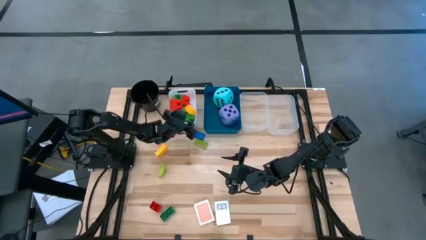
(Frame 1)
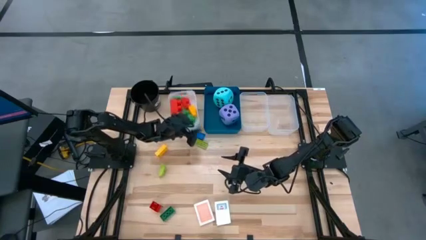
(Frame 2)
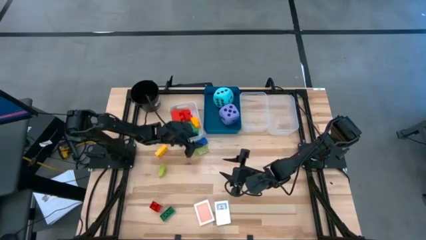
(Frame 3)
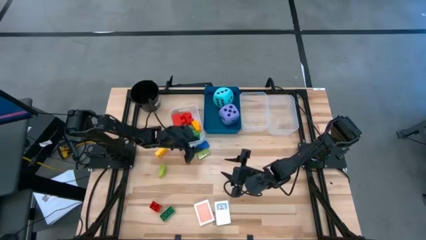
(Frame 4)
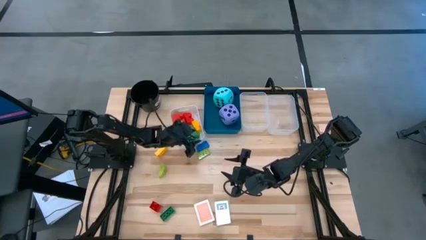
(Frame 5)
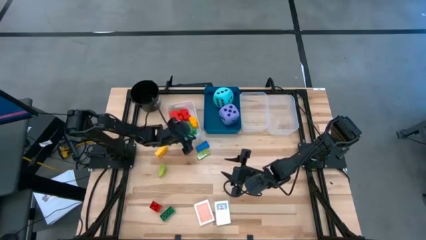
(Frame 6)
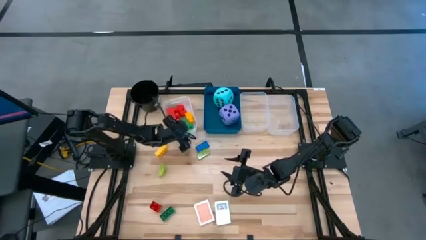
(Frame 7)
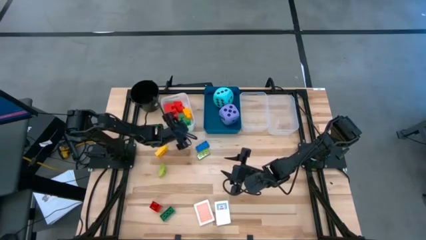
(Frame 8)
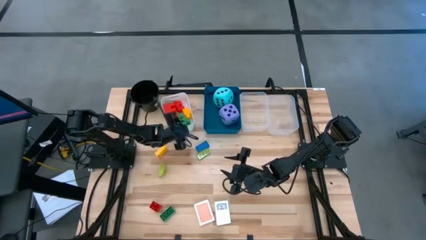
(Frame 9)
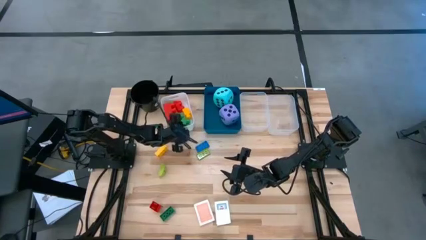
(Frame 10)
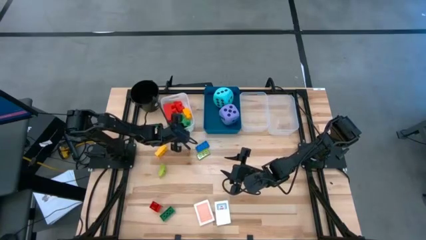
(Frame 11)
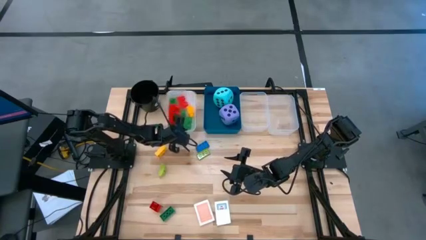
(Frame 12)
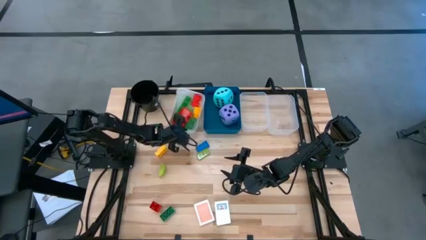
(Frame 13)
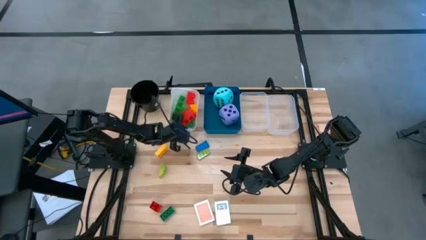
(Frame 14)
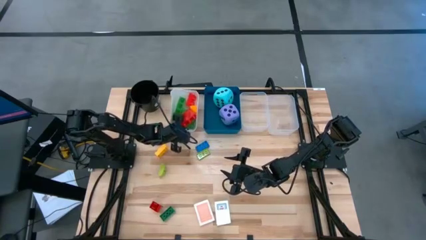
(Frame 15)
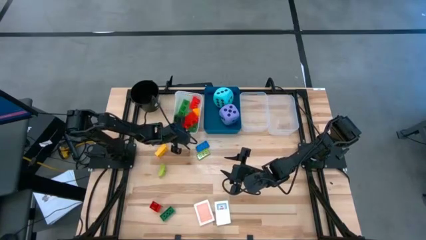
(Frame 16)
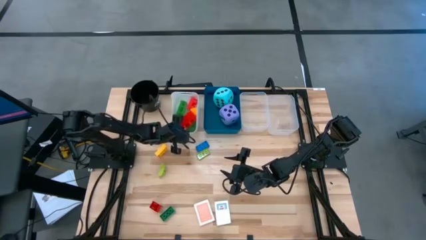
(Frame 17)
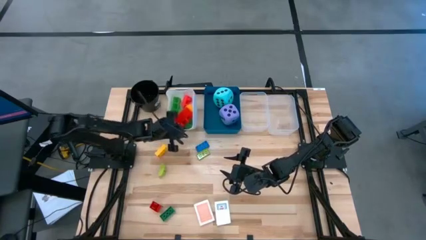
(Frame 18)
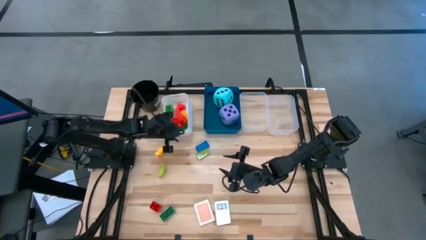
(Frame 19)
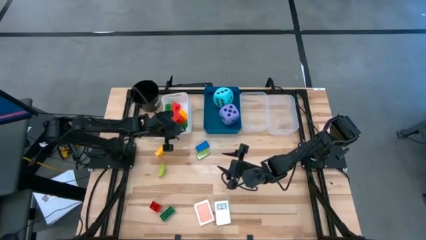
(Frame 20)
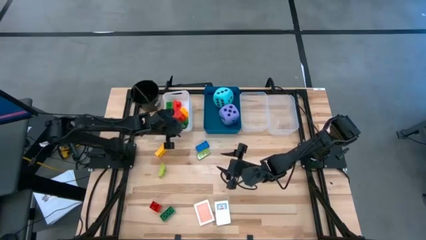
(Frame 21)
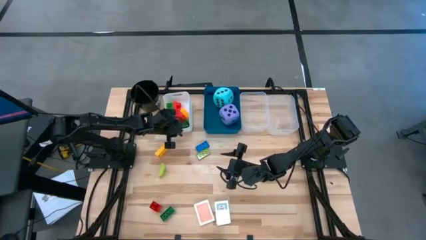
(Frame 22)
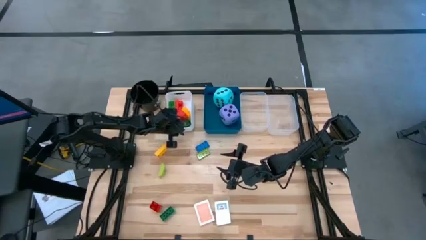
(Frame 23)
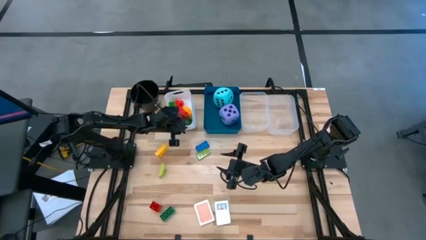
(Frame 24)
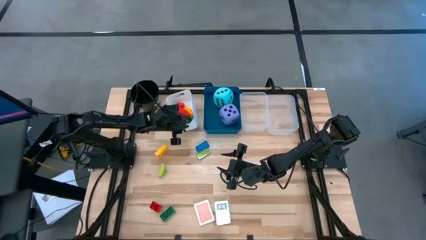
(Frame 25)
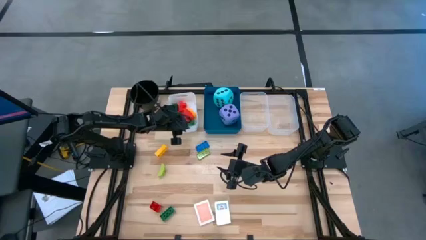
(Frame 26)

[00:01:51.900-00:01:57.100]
Task: Pick & Place Toys
Adjust the white bin

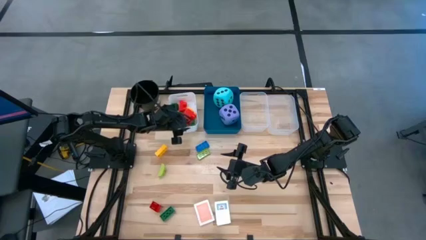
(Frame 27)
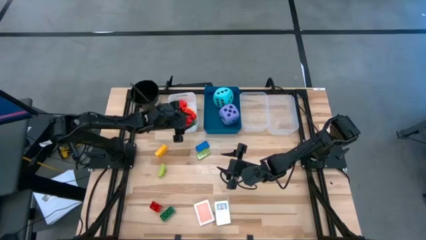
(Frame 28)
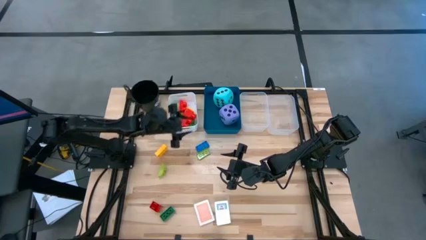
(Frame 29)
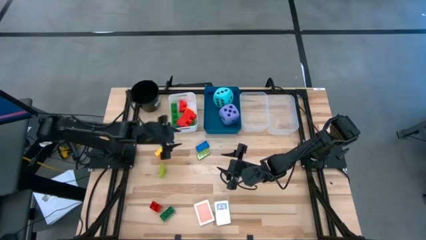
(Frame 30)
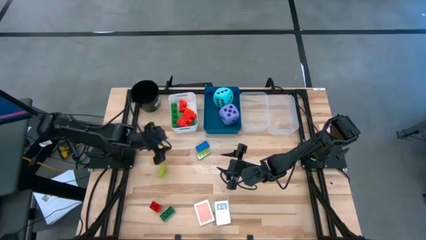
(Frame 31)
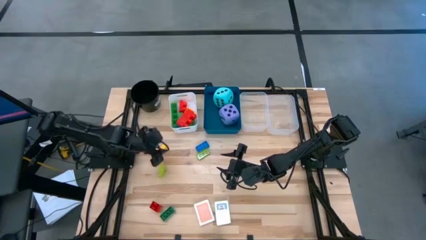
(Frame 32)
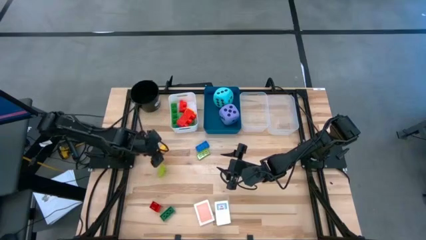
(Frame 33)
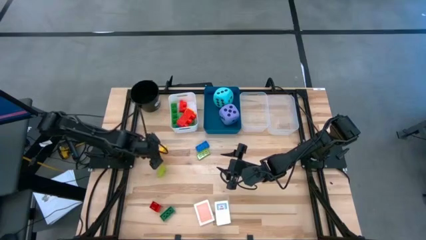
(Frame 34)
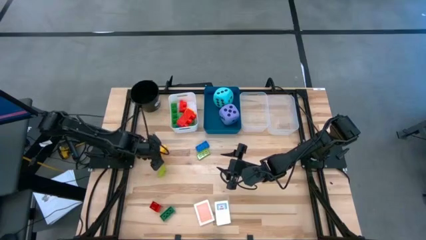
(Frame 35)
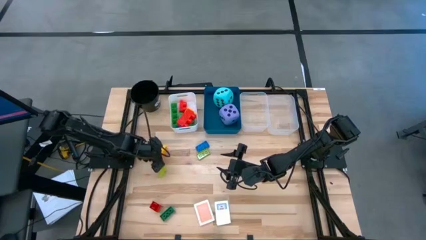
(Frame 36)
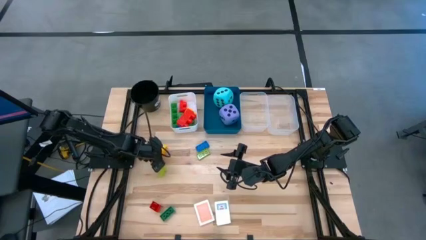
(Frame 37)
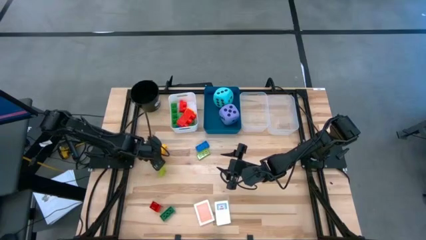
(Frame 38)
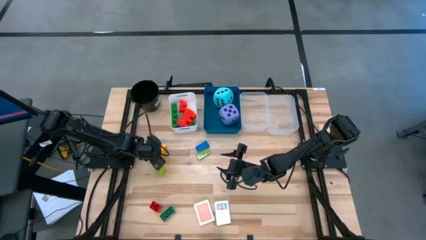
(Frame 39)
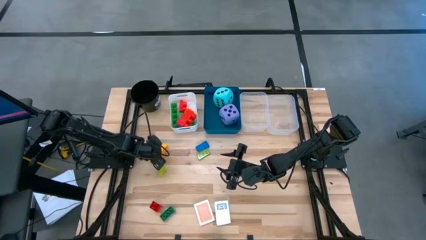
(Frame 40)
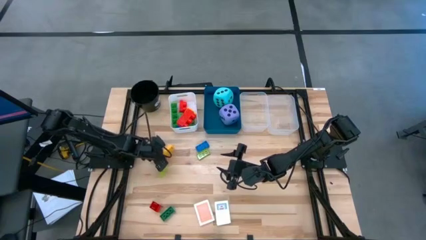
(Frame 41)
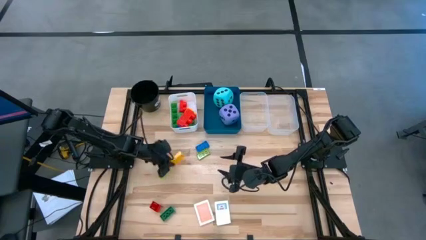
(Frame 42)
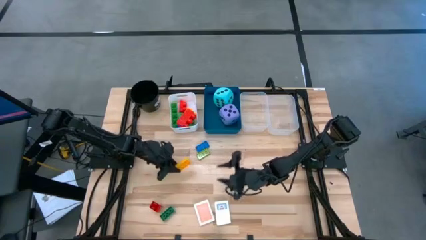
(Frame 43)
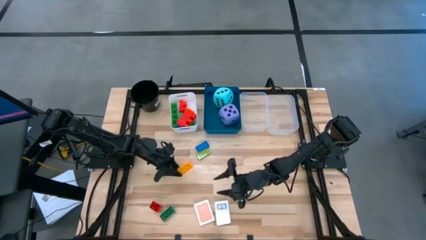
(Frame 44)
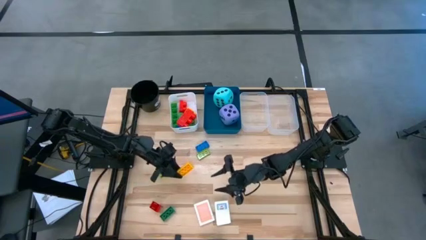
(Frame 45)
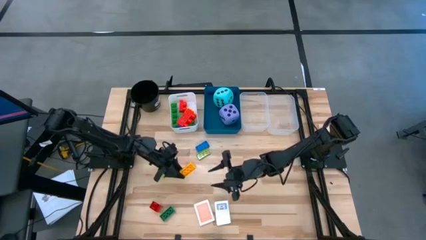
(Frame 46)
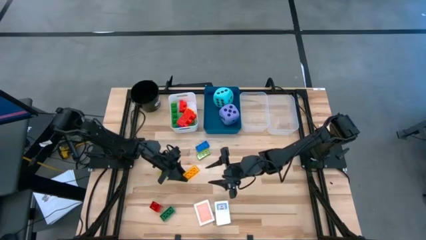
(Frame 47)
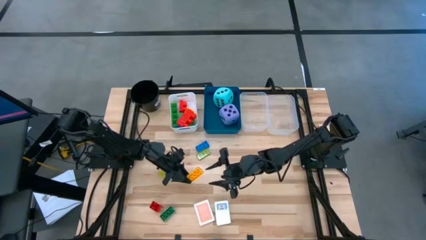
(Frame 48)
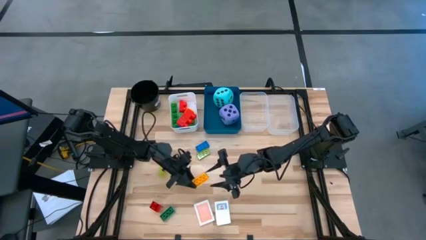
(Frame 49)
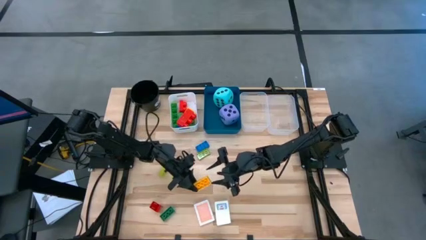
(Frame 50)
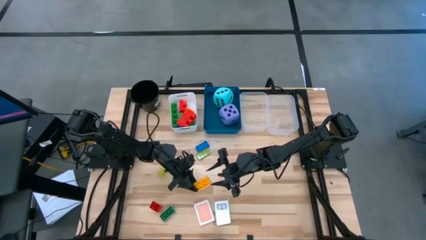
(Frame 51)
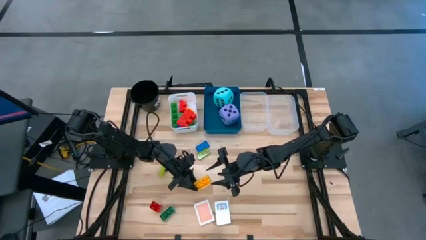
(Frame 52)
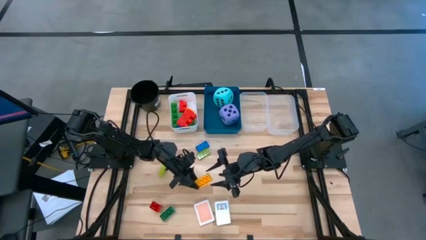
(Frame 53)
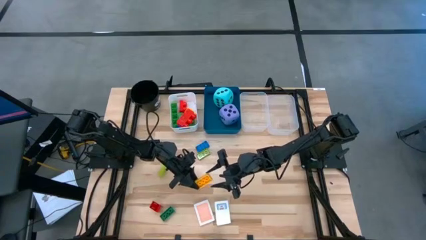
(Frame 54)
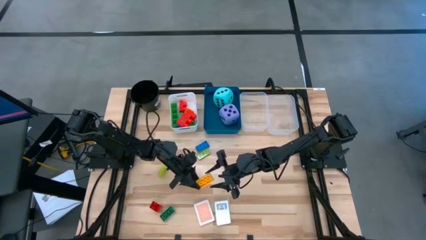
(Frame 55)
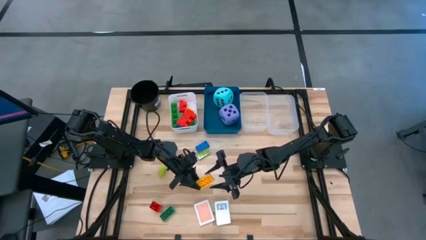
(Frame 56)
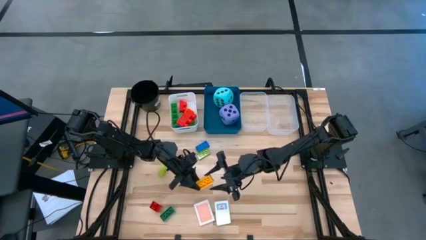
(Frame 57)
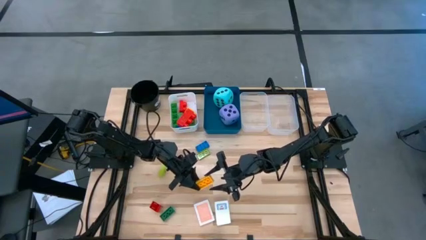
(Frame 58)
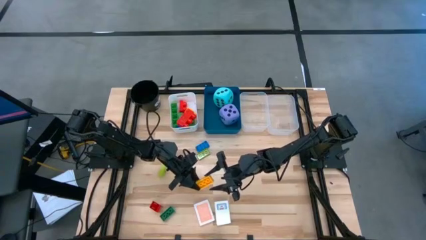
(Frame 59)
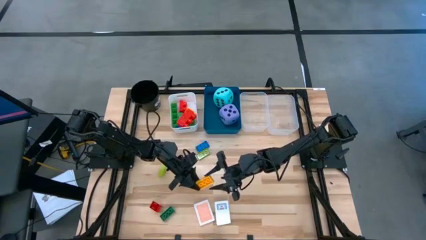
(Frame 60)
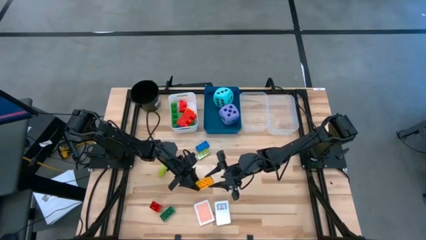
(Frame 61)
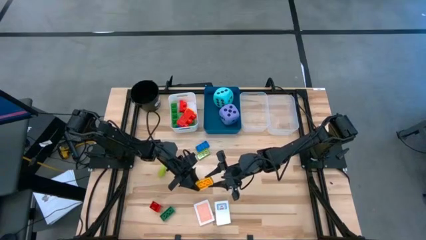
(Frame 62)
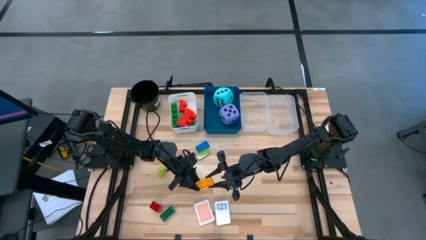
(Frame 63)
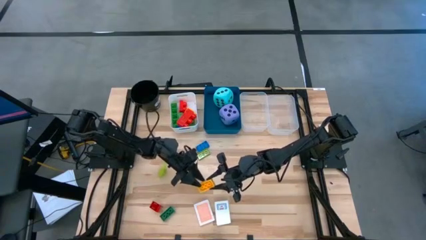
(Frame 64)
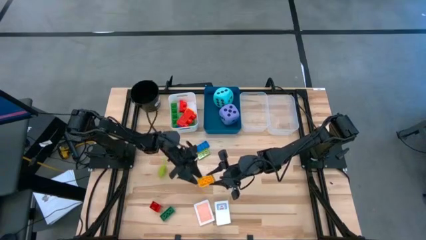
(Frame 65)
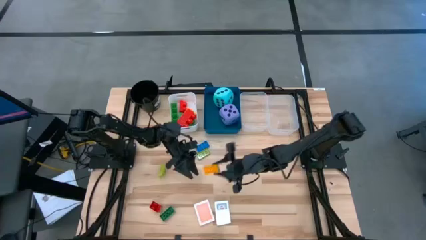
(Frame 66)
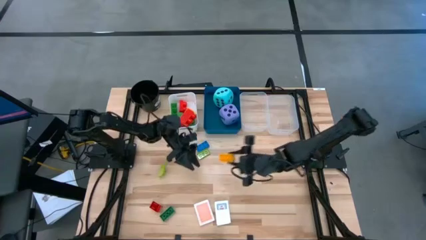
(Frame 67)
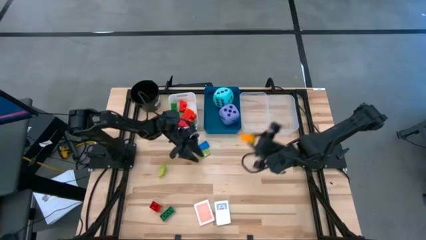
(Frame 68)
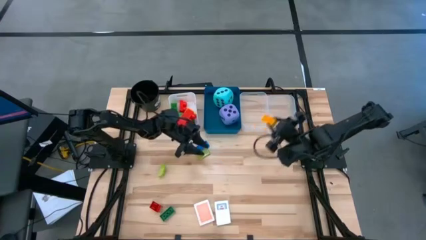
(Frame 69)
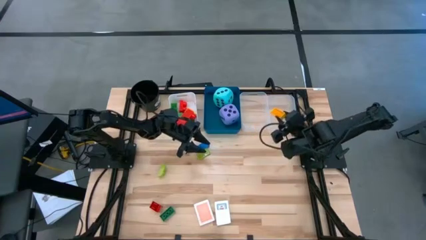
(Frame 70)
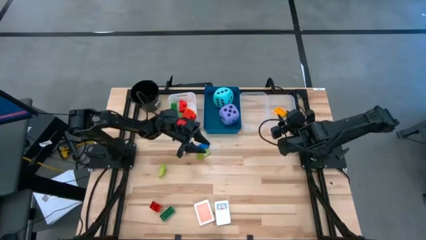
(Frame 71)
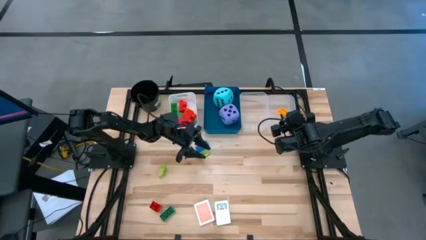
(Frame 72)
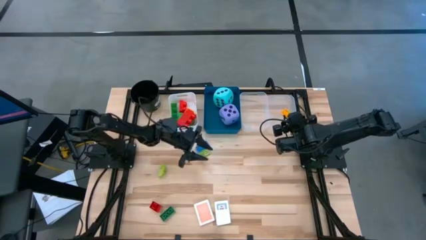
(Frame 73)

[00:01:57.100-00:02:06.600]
Put the small yellow game piece into the right transparent bin

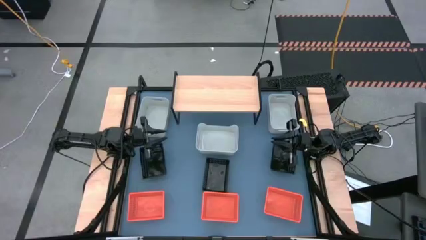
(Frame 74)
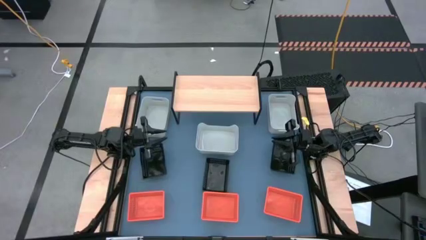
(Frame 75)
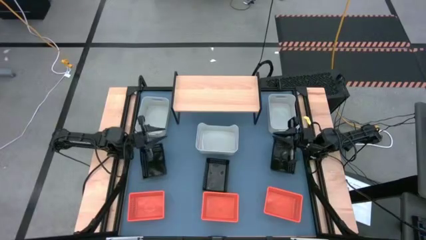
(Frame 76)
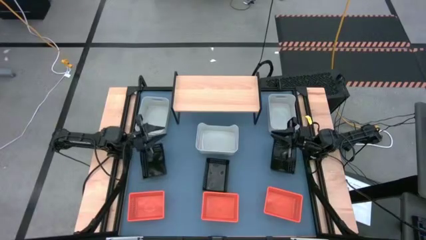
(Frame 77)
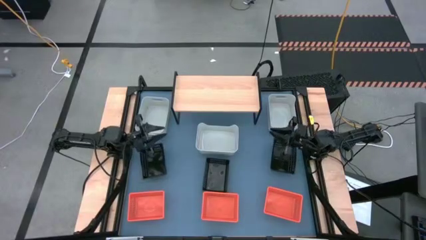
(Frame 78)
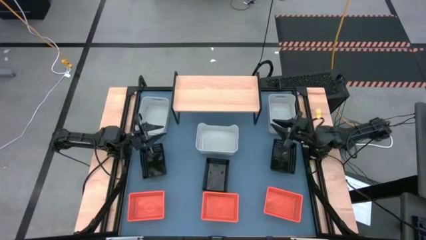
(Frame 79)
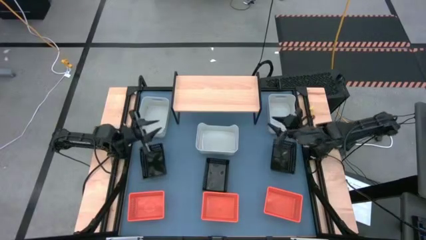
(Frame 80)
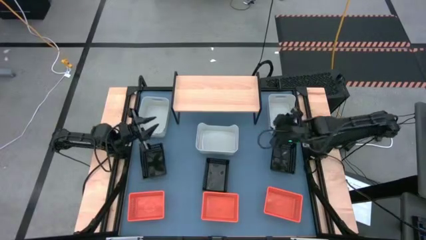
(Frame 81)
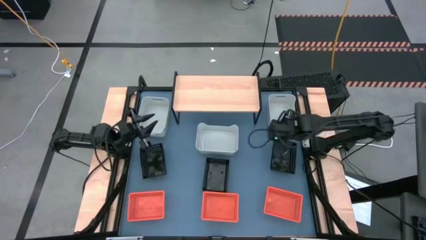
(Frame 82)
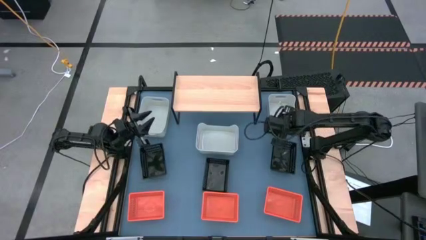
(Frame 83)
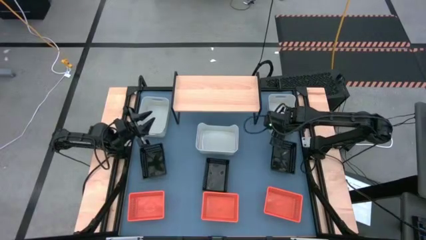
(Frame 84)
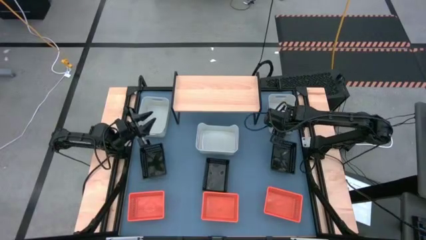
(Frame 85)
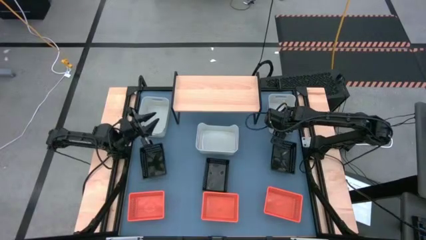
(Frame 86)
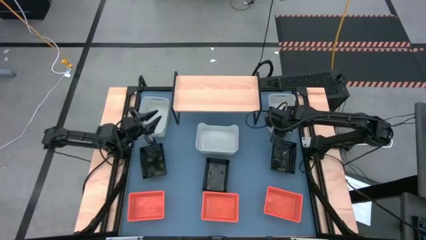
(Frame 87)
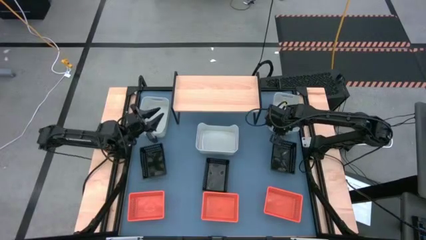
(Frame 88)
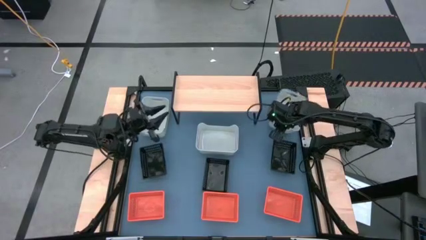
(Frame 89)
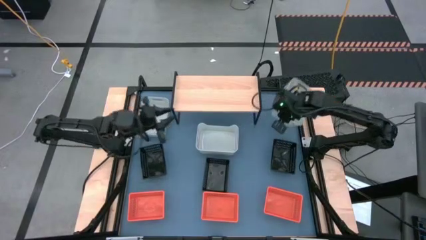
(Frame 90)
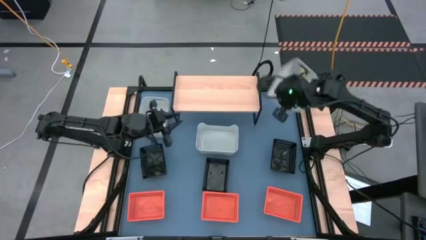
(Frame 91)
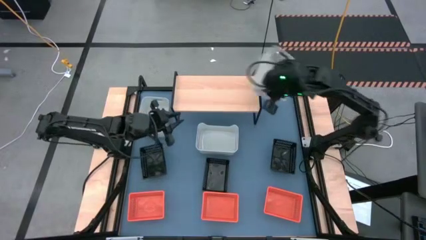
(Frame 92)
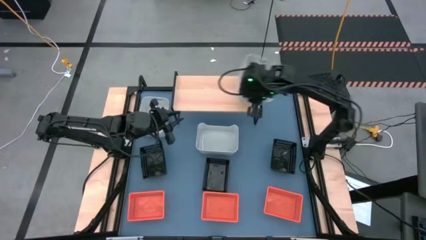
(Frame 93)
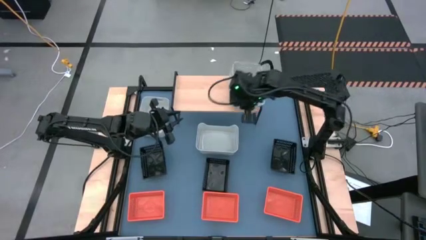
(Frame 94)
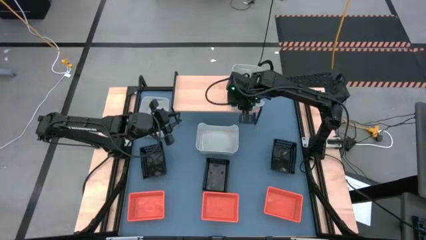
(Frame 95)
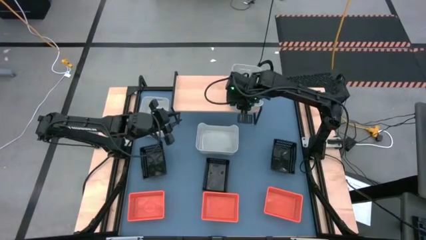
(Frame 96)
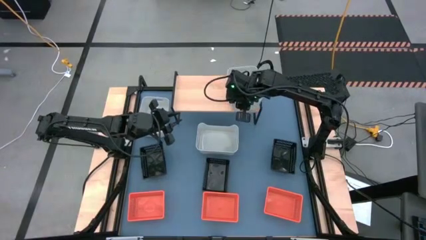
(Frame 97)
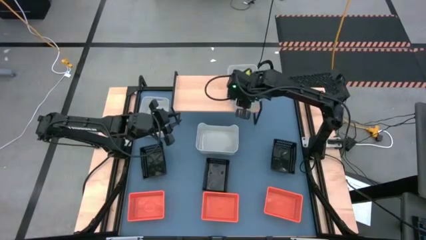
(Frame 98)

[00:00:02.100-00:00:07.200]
Task: Stack baskets on shelf by color
Put the right grey bin on the shelf
